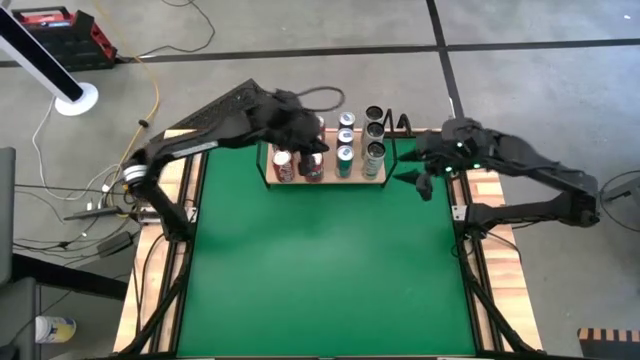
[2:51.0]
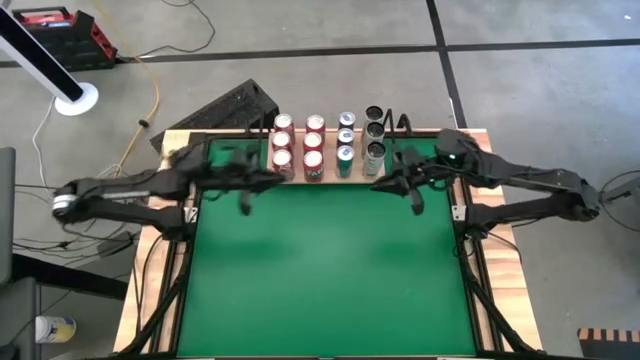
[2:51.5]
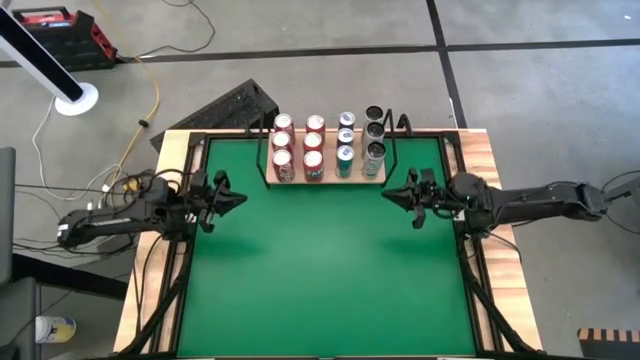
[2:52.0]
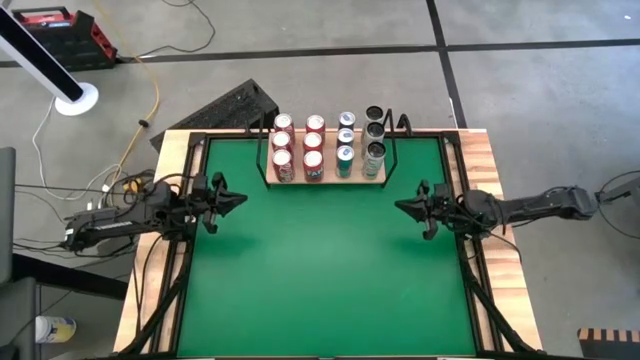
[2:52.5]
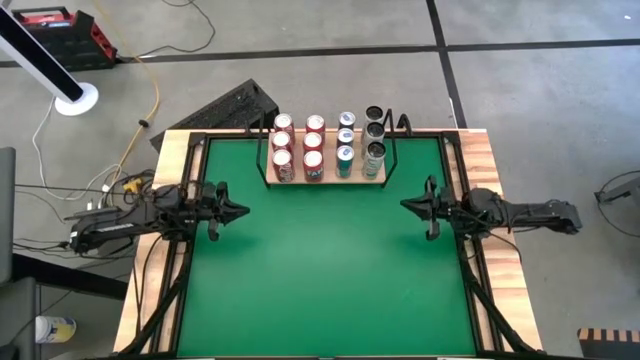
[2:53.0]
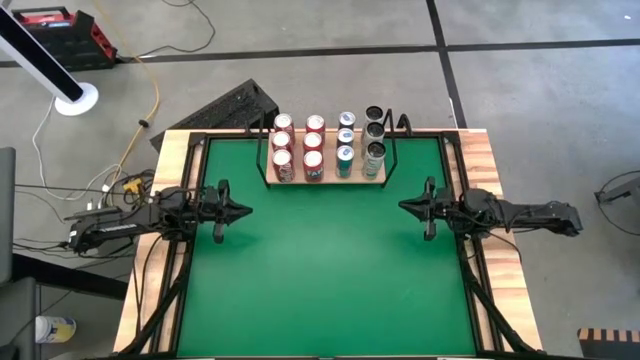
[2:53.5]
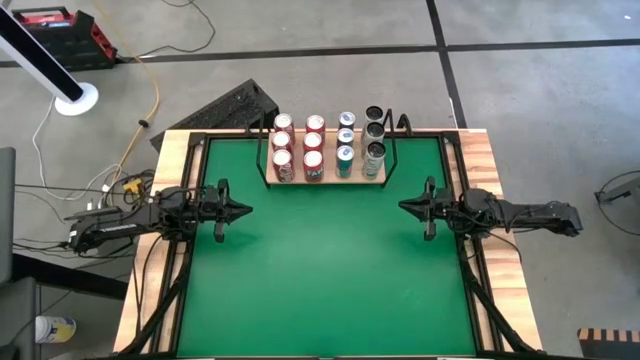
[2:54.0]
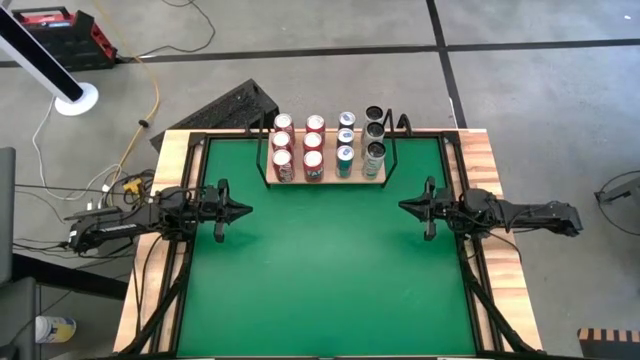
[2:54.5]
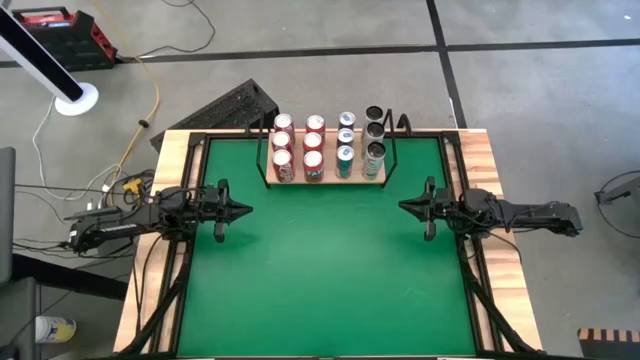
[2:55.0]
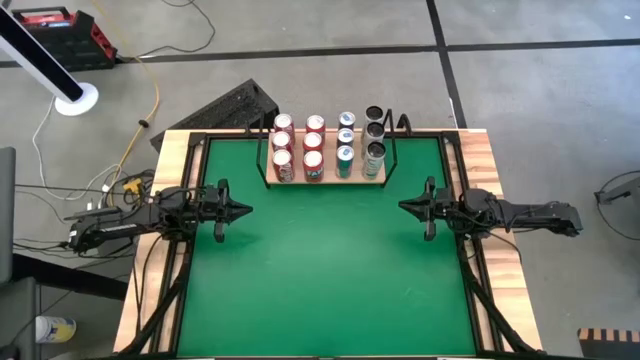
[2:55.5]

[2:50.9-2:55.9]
Task: Place canned beverage on shelf
Return to Home Position

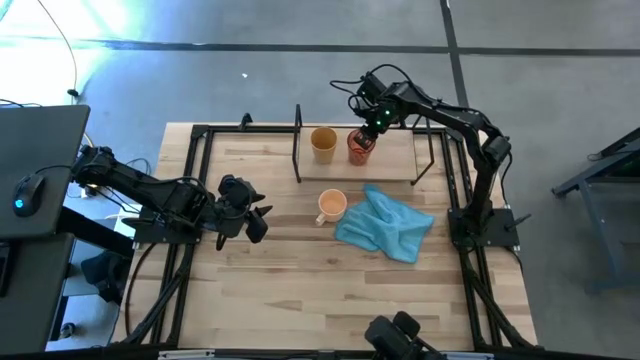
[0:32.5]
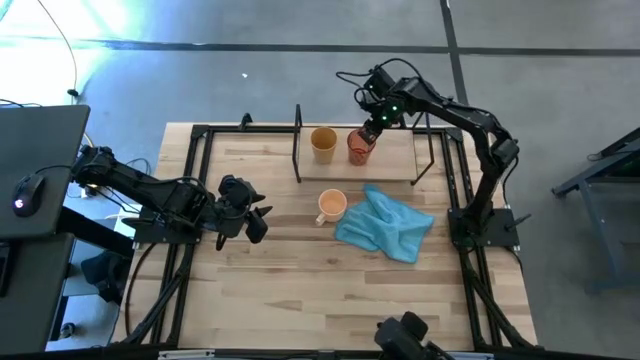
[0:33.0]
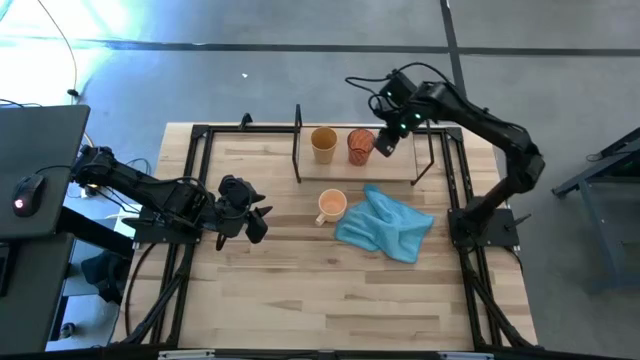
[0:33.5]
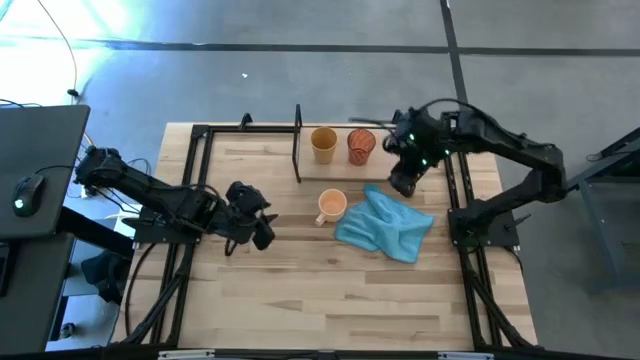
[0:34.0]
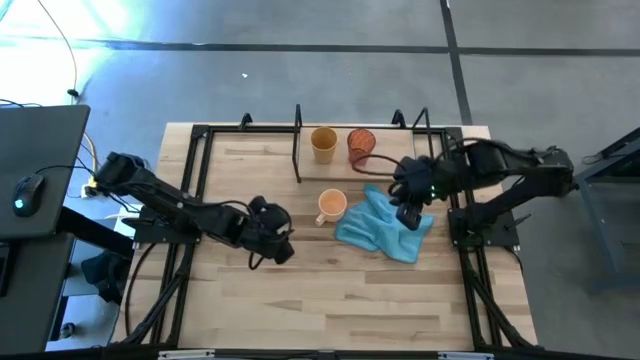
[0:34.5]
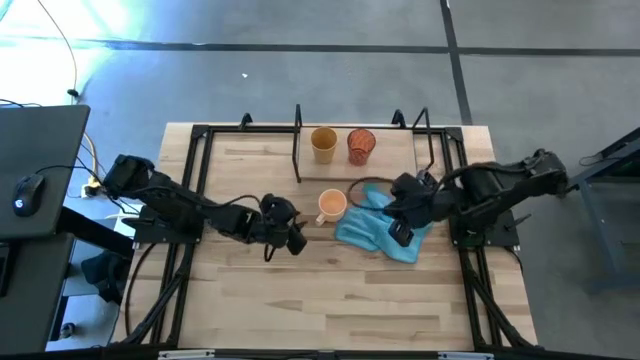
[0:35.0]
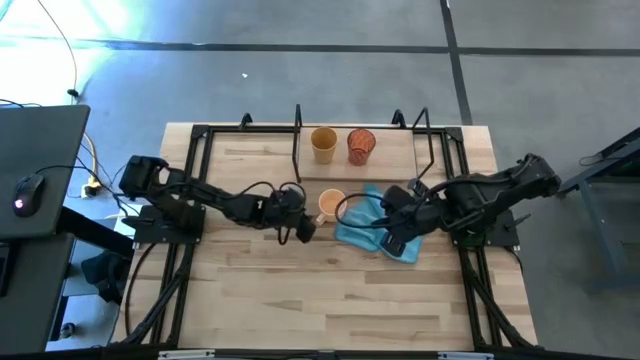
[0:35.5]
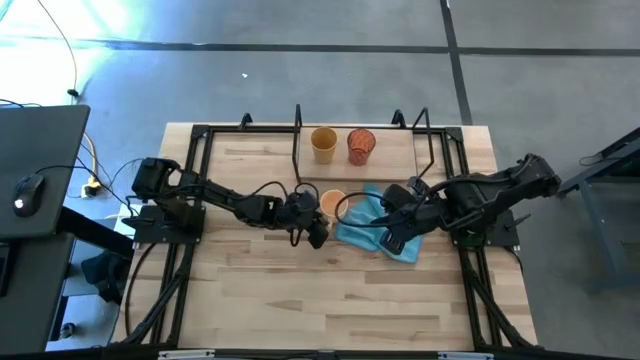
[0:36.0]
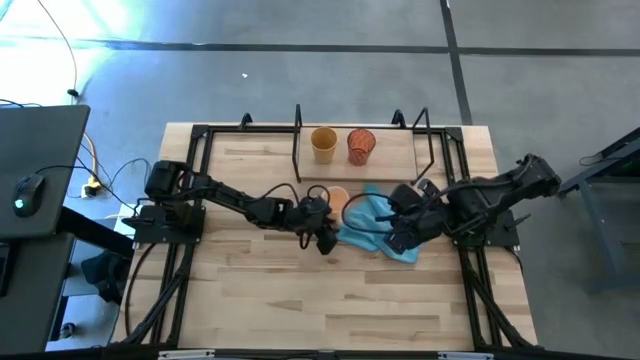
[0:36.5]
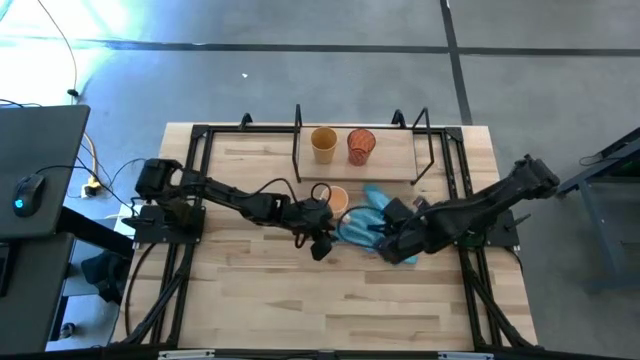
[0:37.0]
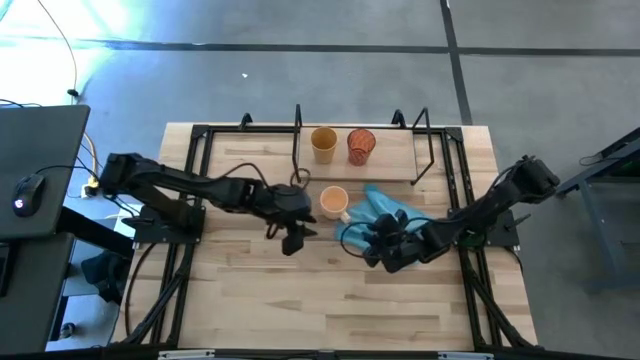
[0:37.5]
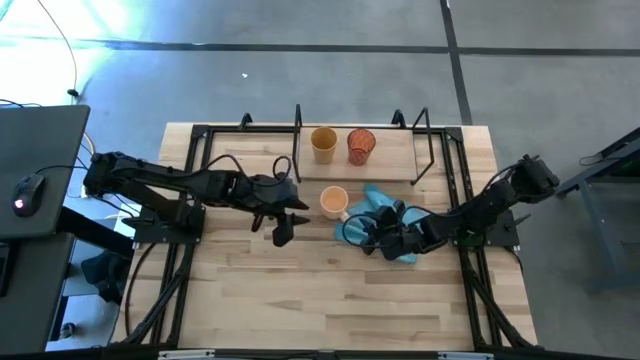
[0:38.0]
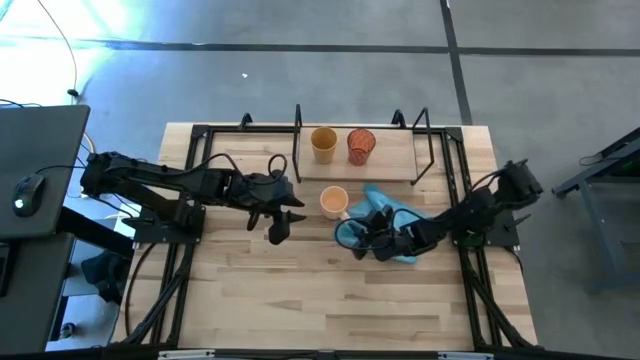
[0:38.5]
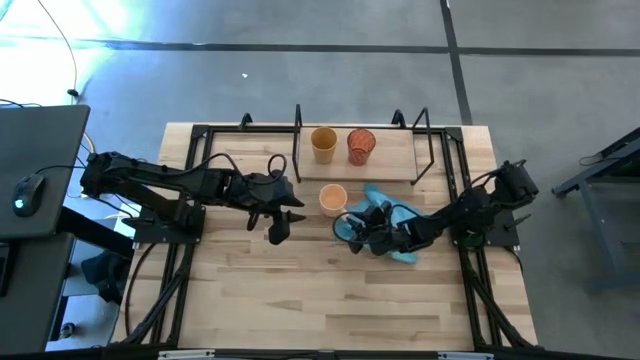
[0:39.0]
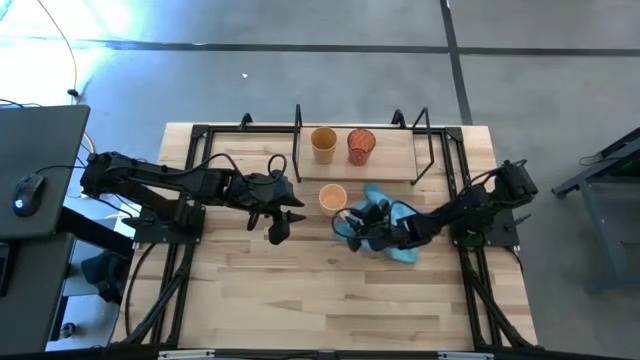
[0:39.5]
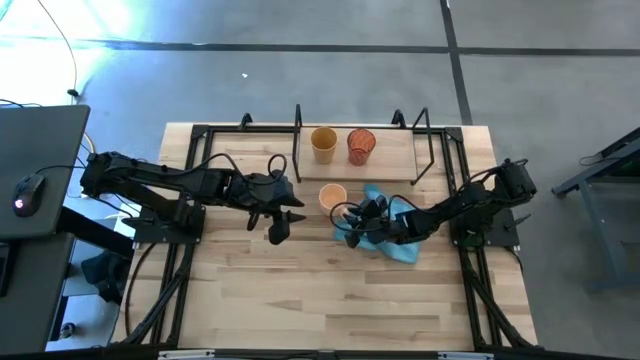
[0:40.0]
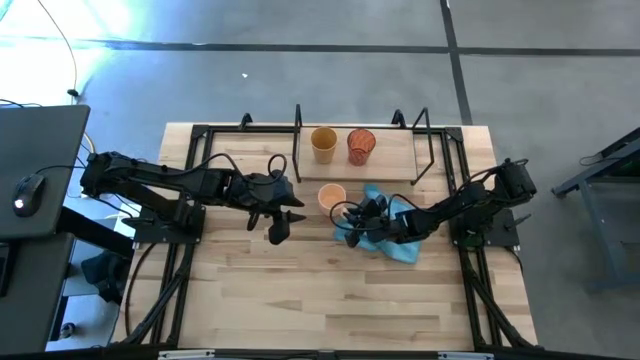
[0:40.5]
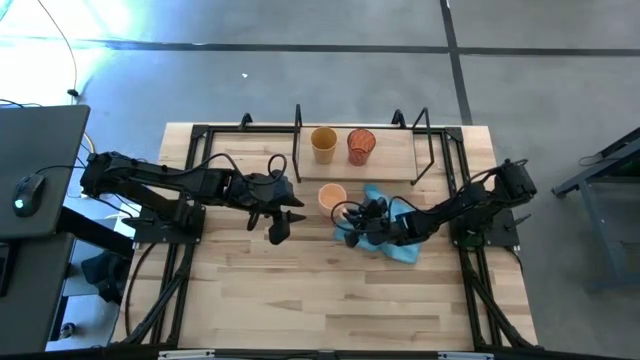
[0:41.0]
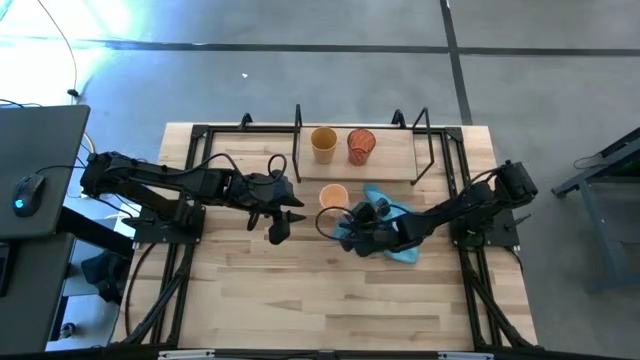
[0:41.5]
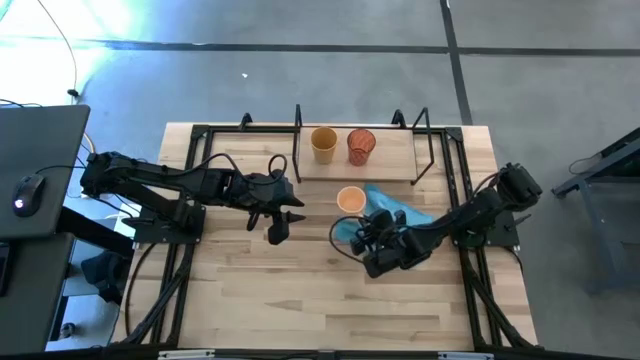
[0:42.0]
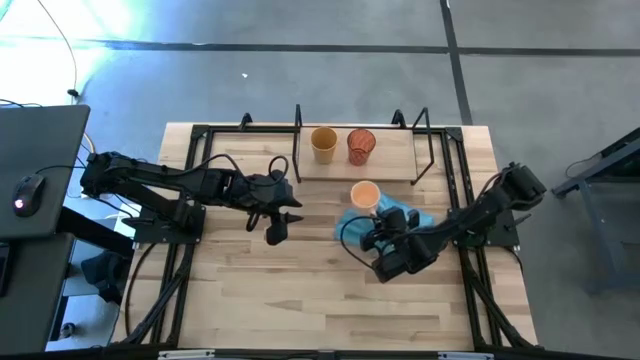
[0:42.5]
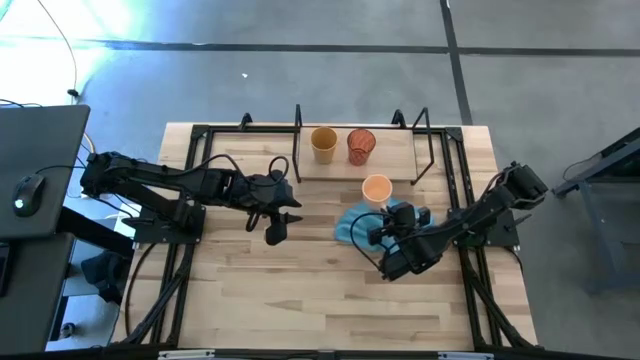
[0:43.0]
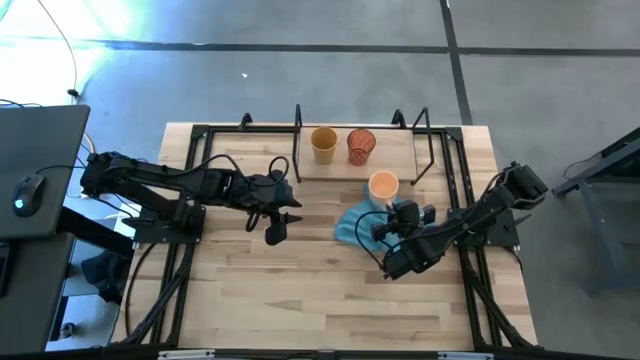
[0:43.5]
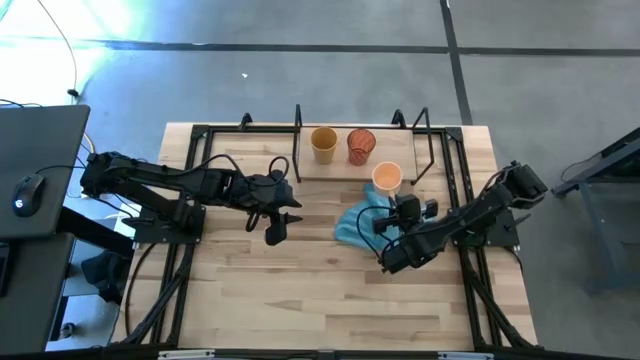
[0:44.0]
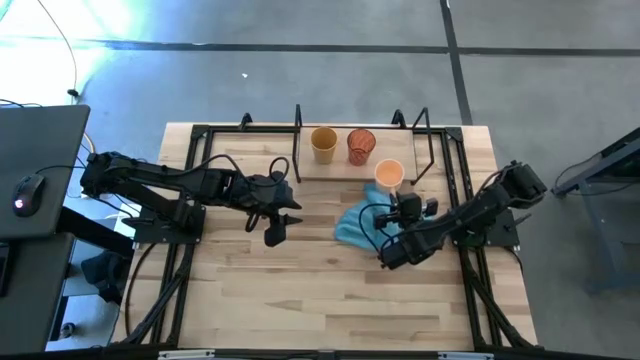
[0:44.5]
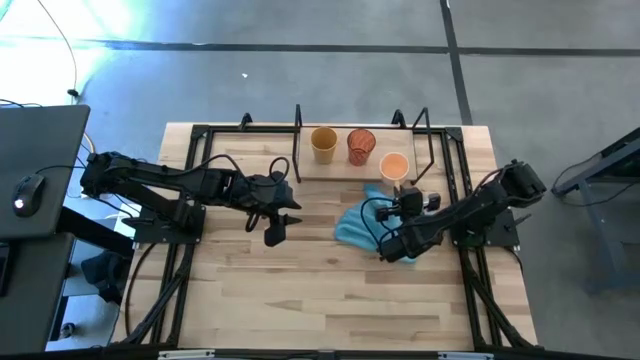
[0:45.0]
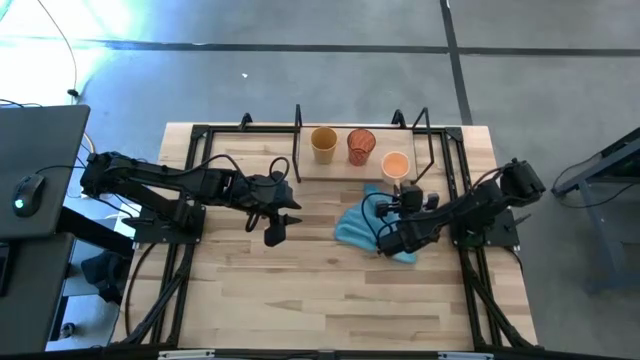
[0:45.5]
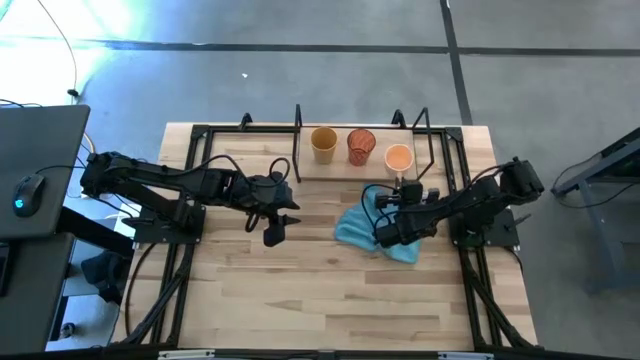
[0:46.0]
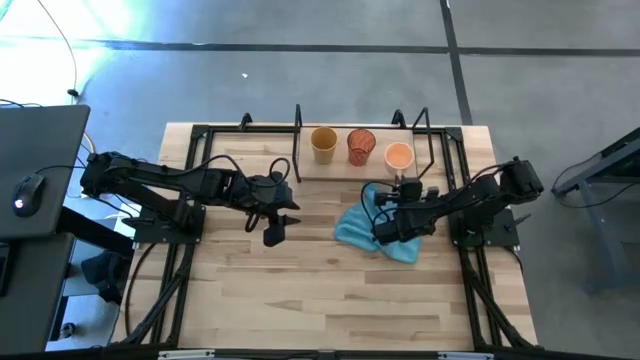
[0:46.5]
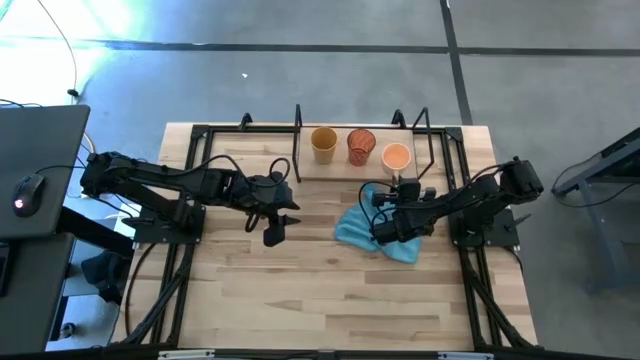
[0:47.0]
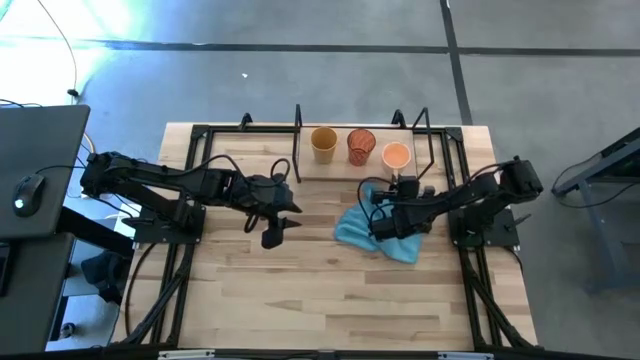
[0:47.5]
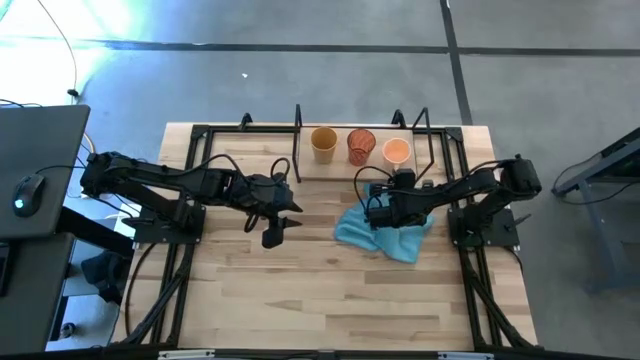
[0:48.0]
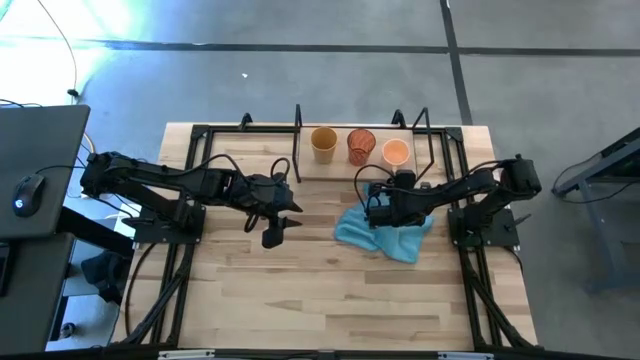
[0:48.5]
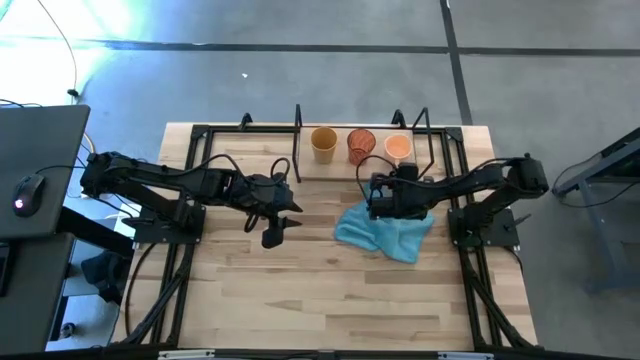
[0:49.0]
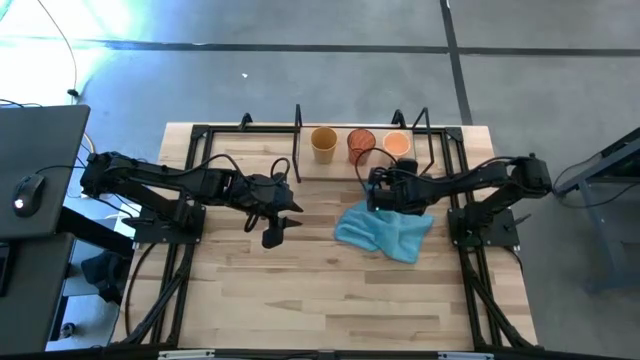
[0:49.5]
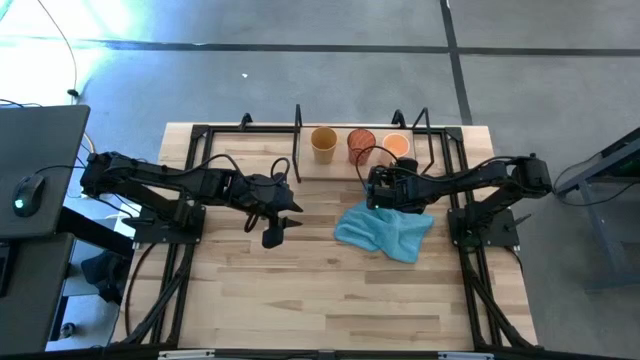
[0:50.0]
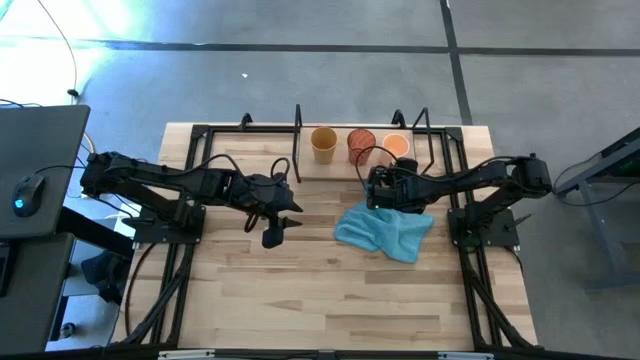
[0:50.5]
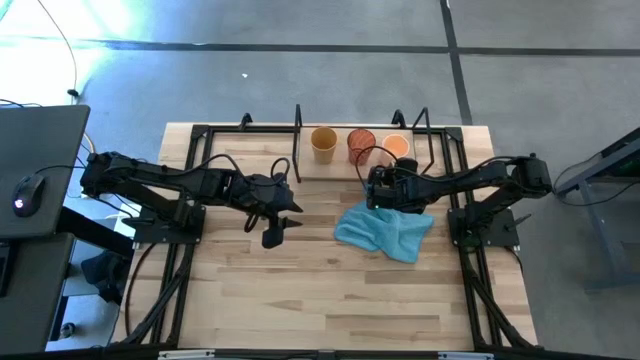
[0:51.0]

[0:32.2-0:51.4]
Task: Stack small to large cups/mugs on shelf
Put the light orange mug on the shelf
